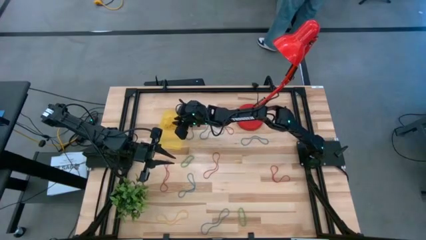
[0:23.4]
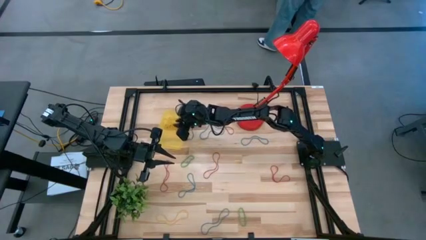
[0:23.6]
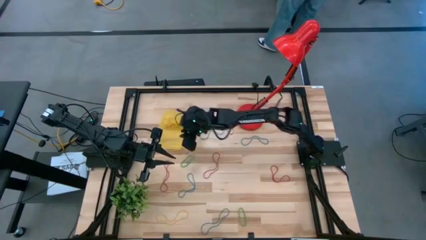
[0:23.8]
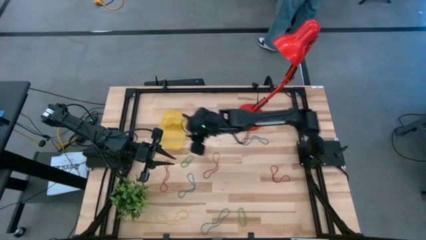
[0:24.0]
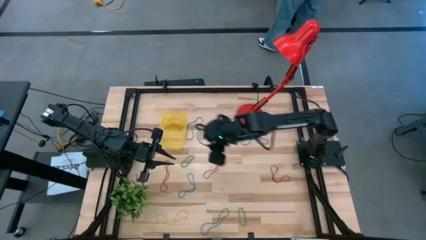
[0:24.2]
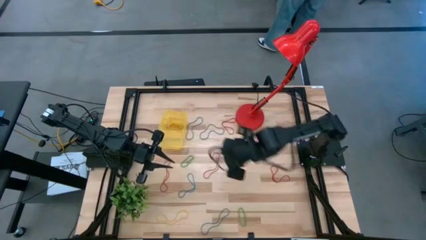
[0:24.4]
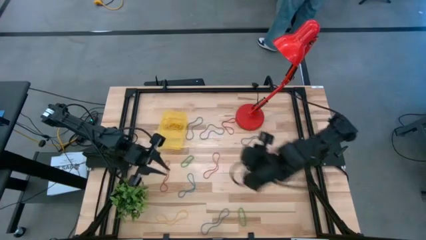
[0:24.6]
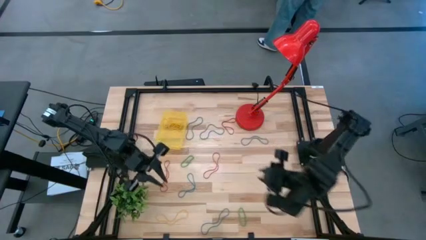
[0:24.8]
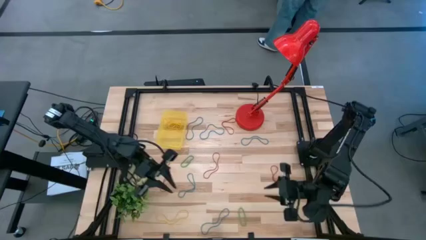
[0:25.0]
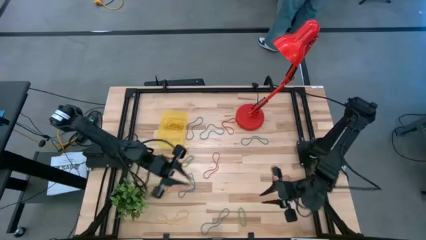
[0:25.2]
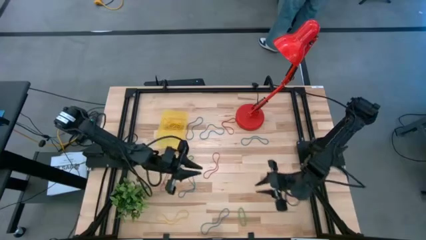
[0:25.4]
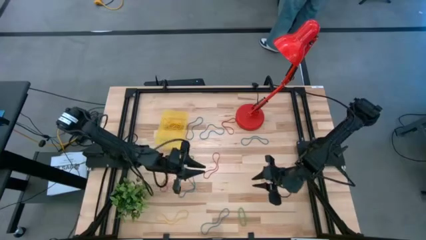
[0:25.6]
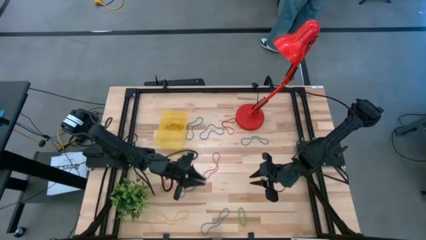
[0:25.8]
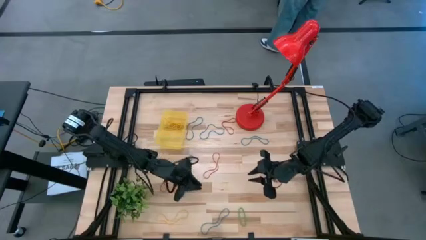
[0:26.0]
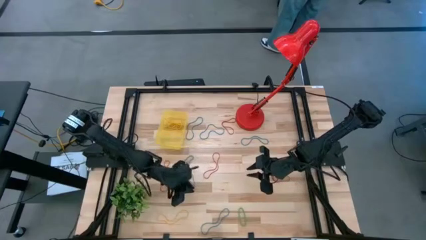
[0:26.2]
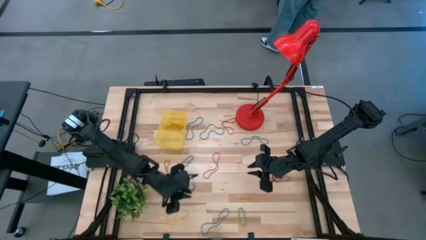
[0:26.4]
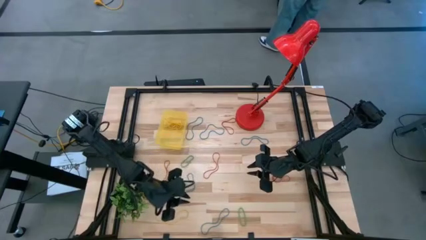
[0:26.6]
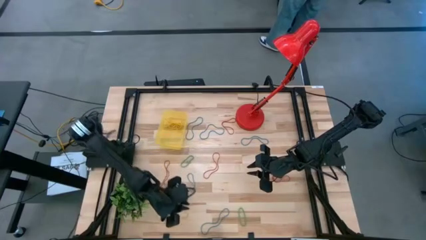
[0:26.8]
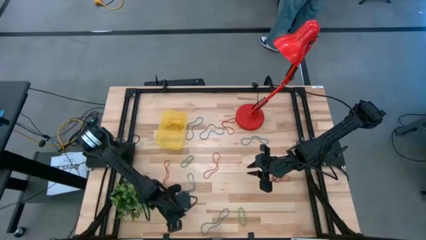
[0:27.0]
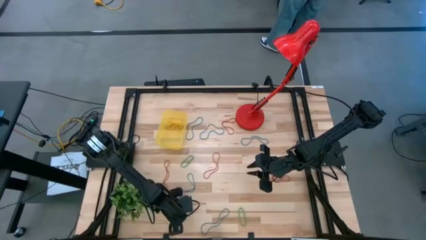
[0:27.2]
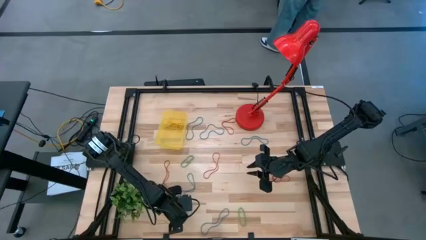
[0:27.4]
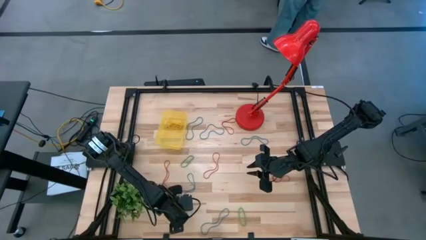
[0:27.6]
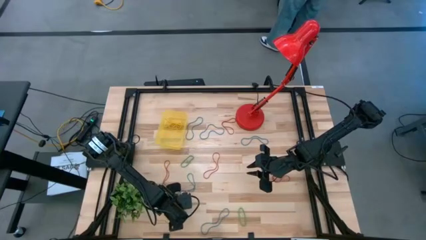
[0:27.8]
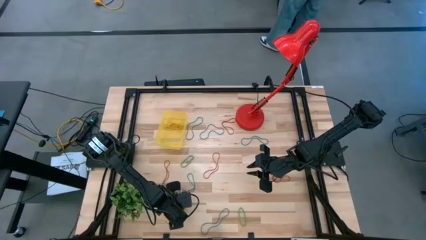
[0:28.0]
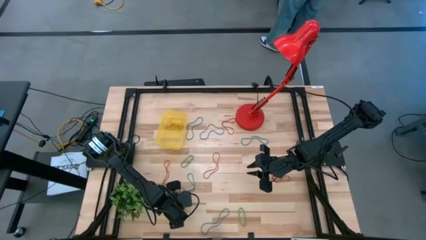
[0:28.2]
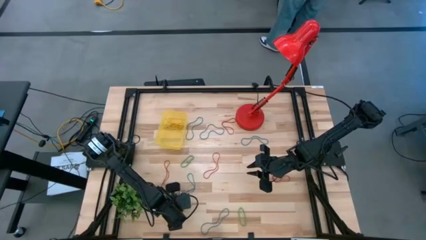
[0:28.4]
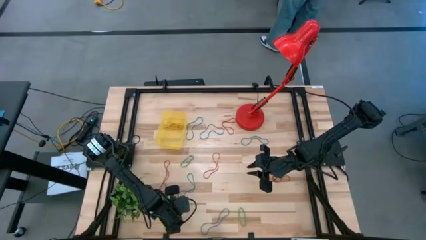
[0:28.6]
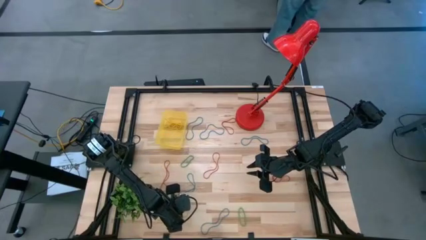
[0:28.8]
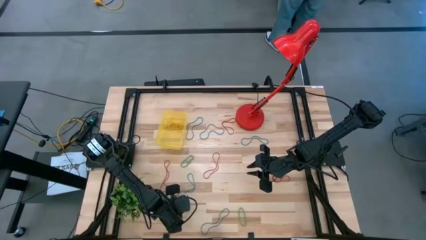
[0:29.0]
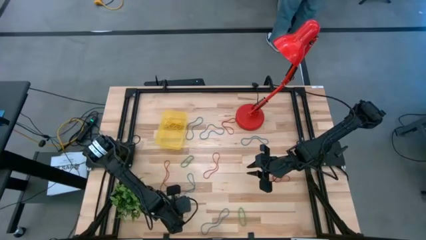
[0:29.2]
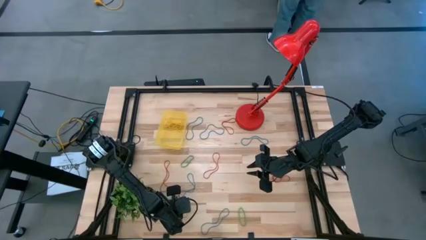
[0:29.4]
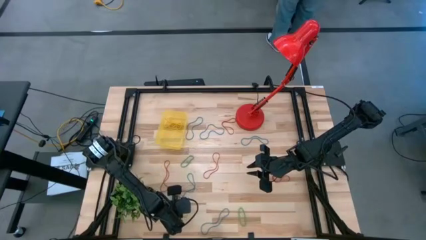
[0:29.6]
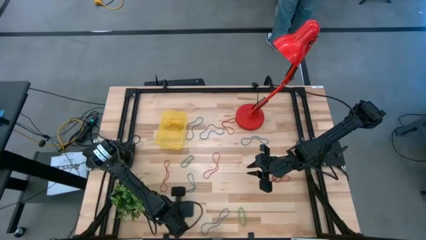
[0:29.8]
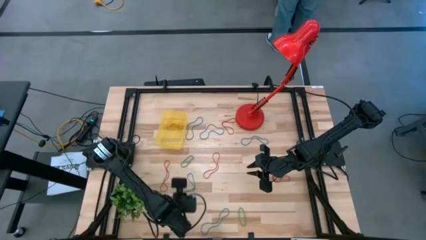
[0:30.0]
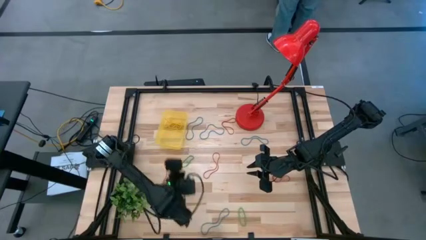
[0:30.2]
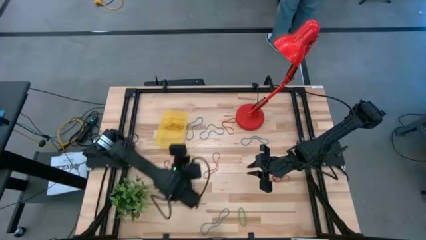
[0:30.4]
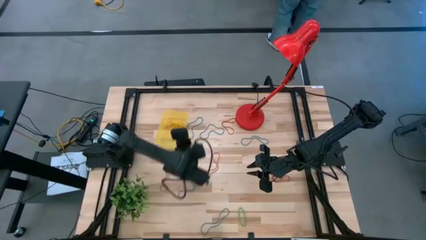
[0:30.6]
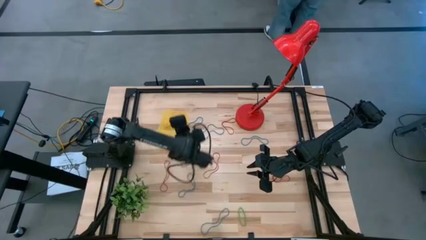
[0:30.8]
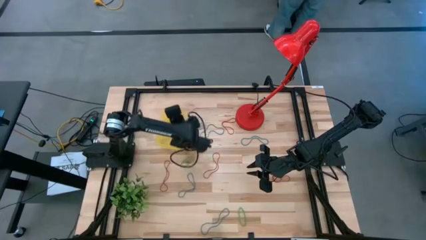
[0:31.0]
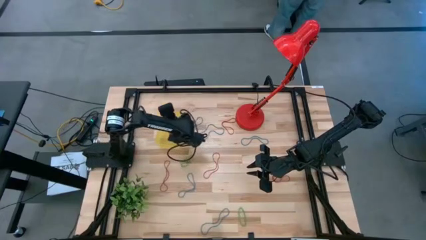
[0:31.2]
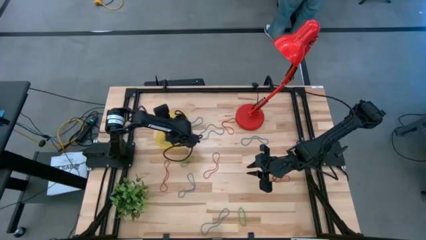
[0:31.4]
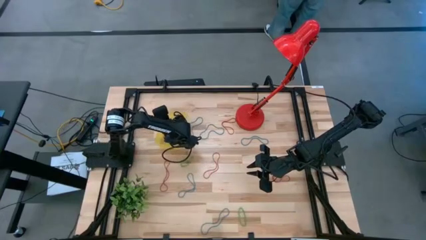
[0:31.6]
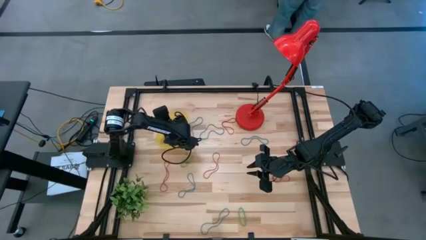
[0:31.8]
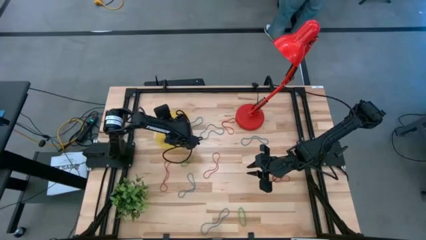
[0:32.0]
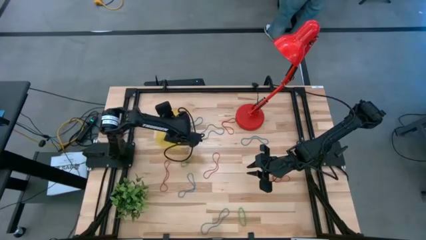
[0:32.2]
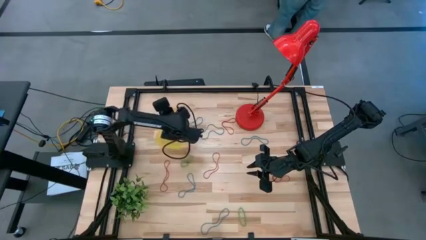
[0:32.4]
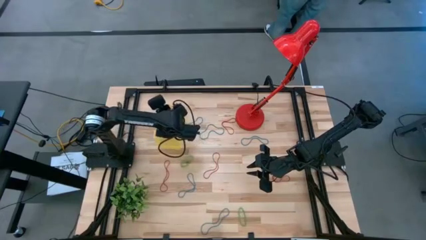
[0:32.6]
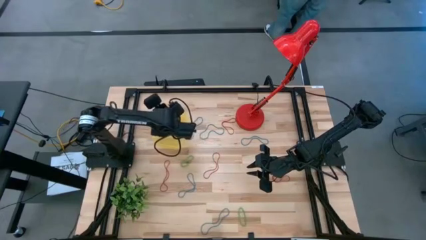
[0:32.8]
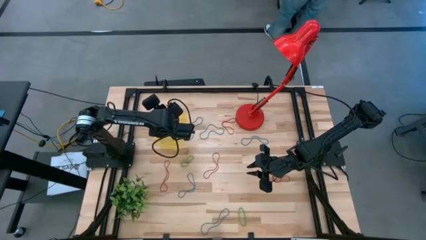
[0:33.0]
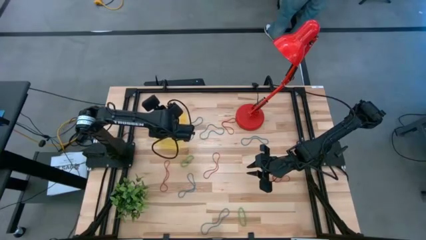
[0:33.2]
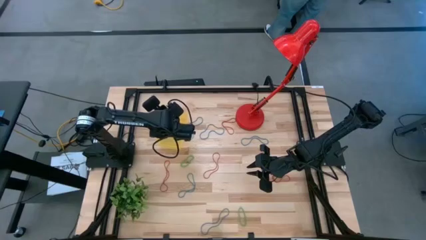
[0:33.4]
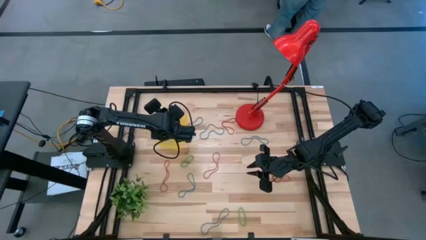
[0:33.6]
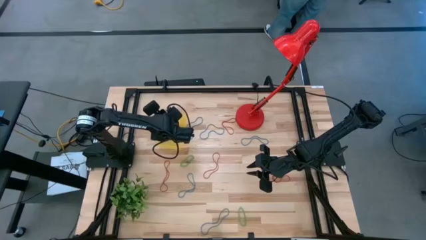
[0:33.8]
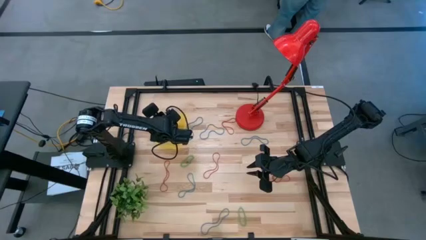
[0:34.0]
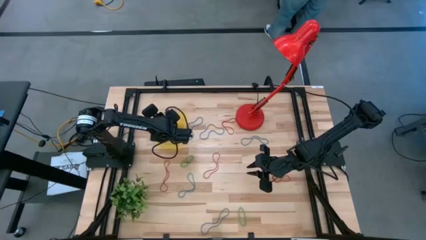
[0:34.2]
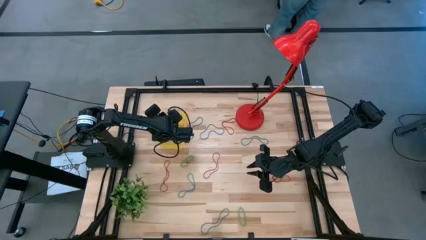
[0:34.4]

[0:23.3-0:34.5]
Task: Pick and place items into bin
Put the yellow rubber band into the yellow bin

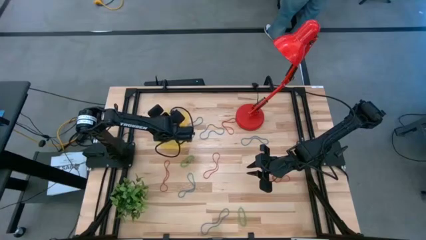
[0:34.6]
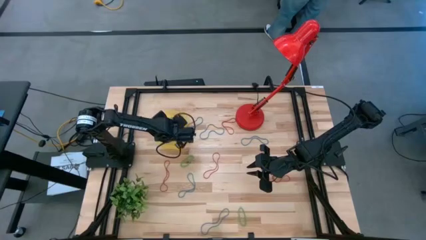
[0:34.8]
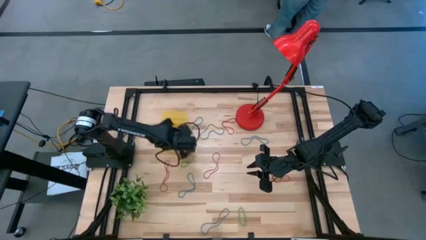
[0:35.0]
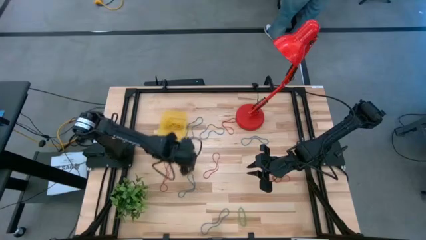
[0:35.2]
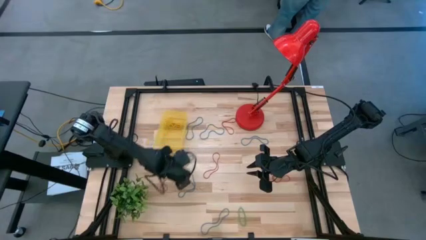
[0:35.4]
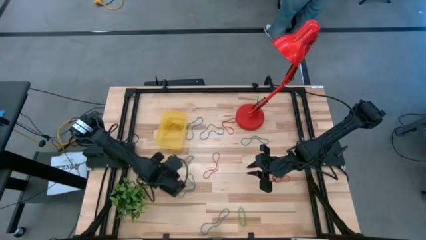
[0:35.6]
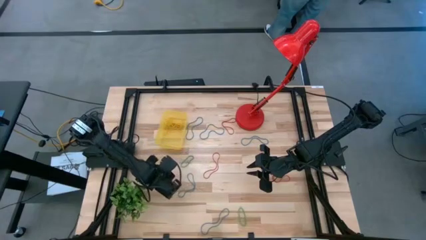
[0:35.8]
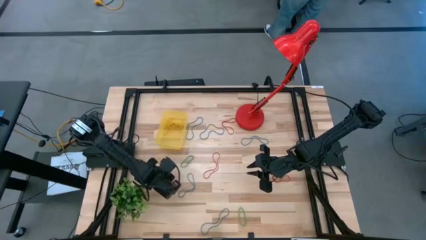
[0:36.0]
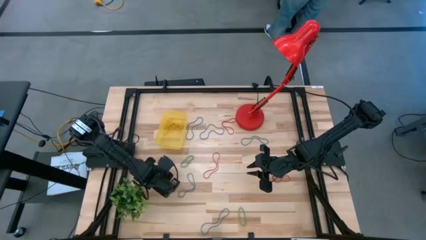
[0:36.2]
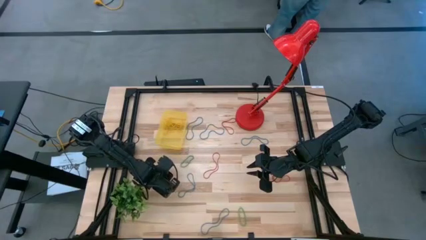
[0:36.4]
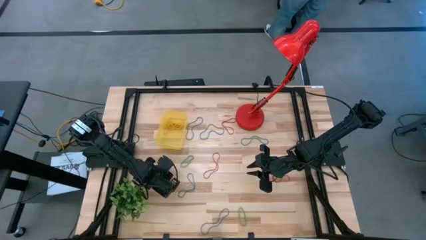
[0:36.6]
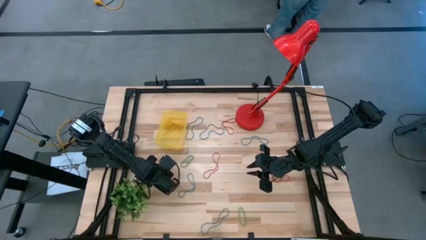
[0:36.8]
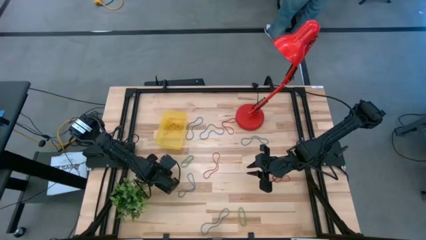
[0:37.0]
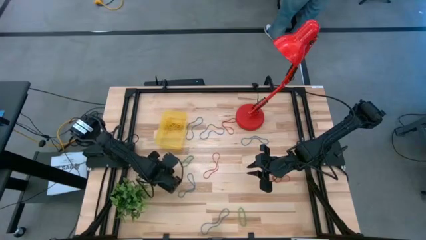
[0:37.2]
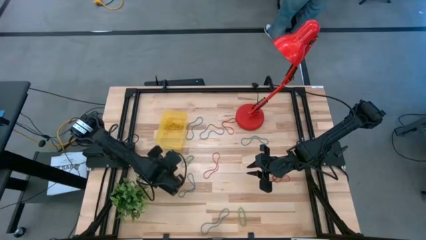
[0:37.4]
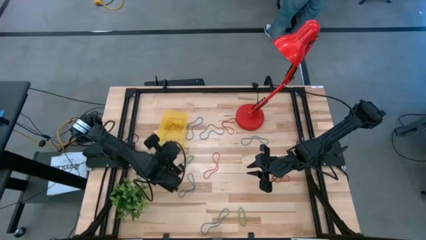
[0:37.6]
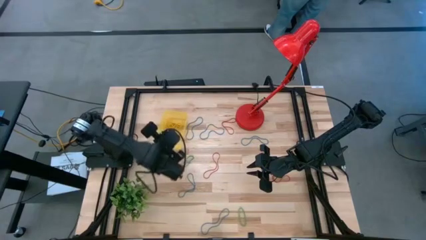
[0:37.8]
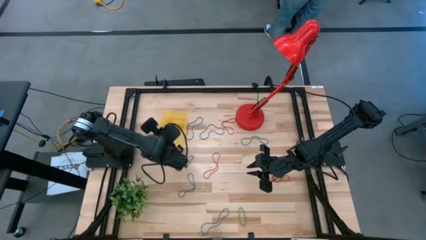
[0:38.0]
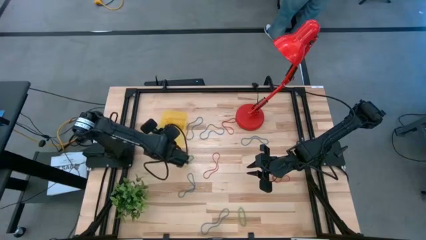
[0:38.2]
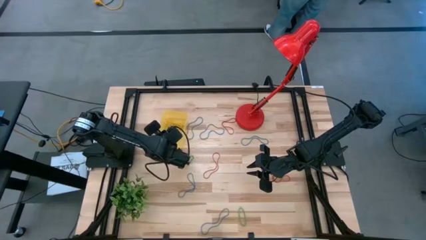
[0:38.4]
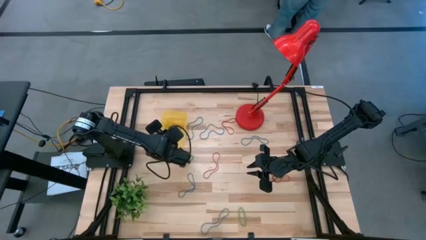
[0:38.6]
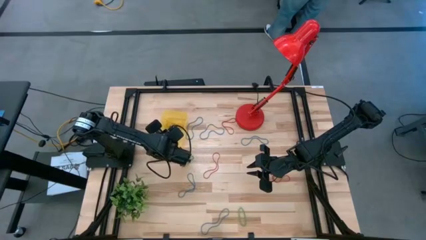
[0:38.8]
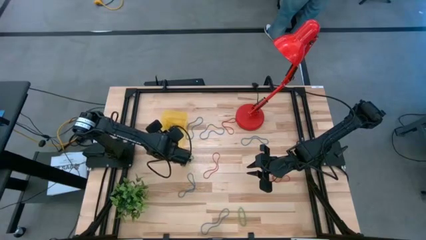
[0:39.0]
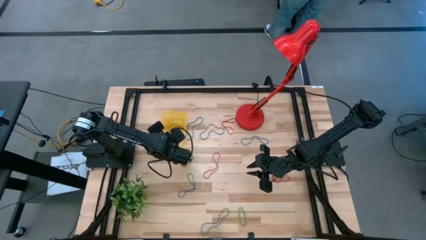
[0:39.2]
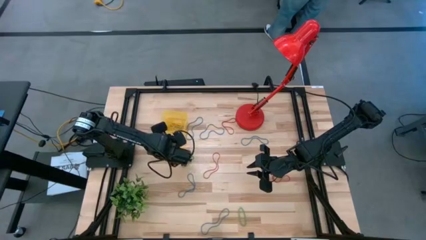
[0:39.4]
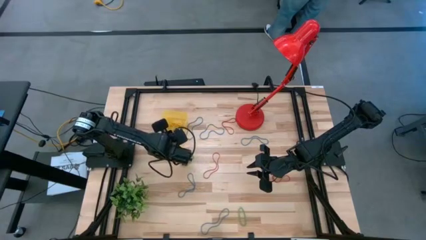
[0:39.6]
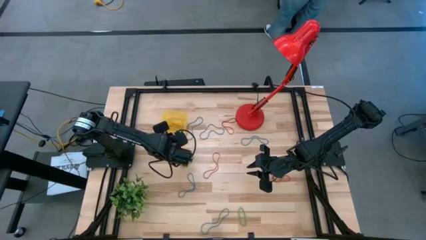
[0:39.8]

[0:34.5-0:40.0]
Put the red rubber band into the yellow bin
